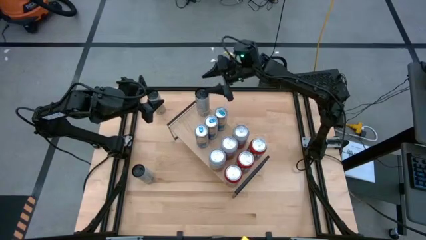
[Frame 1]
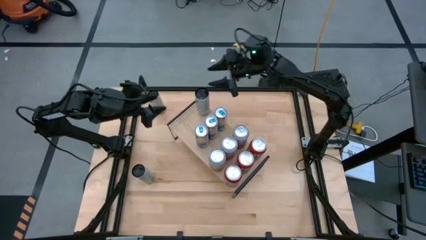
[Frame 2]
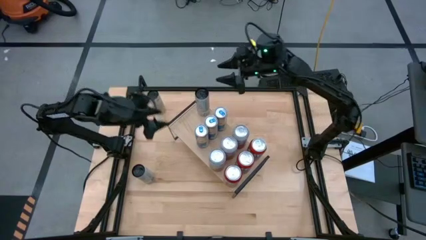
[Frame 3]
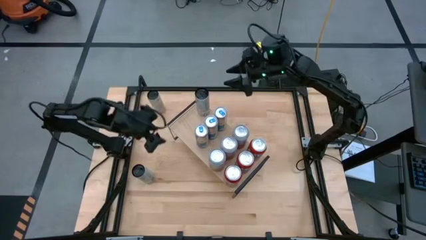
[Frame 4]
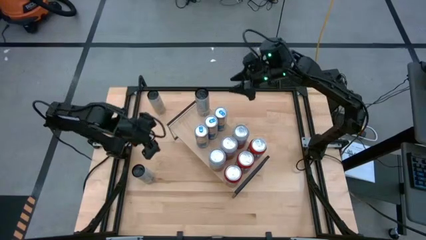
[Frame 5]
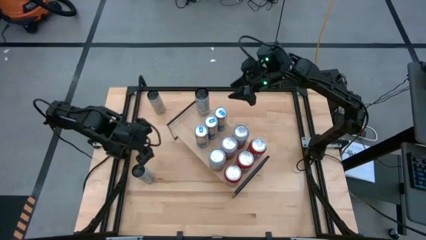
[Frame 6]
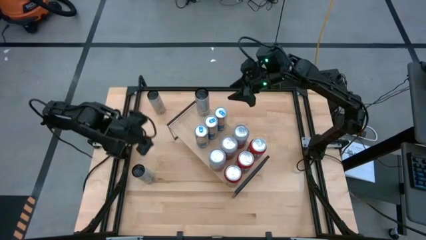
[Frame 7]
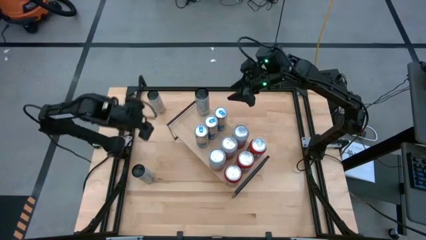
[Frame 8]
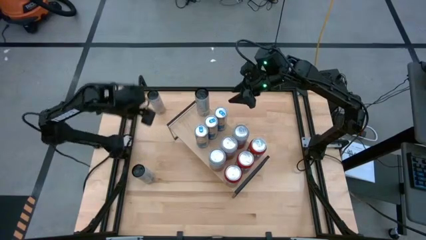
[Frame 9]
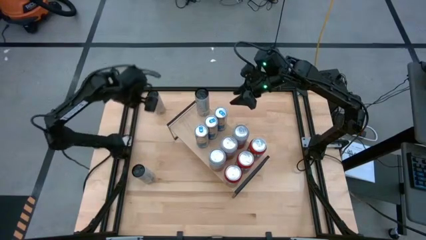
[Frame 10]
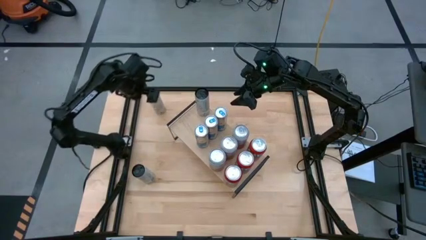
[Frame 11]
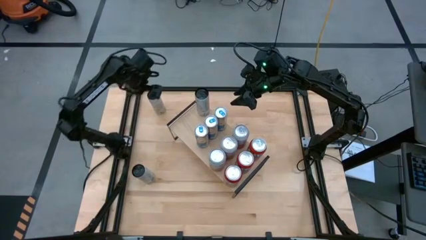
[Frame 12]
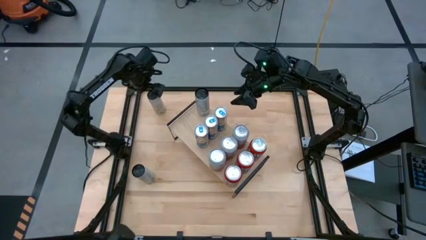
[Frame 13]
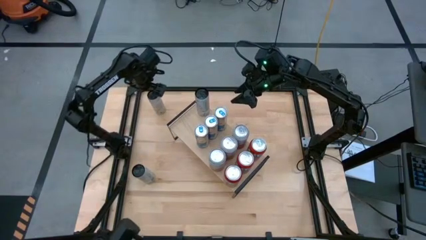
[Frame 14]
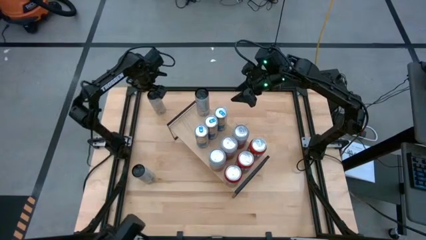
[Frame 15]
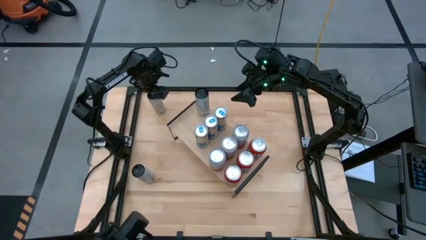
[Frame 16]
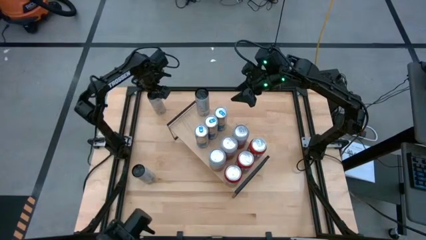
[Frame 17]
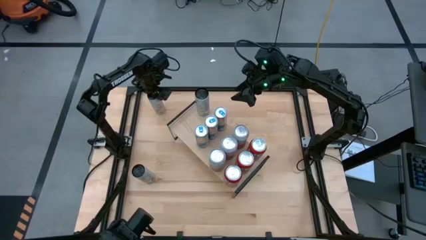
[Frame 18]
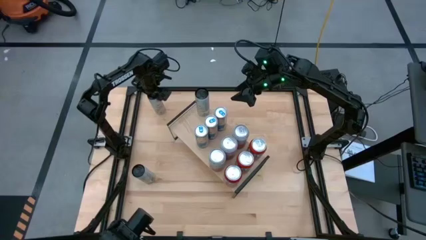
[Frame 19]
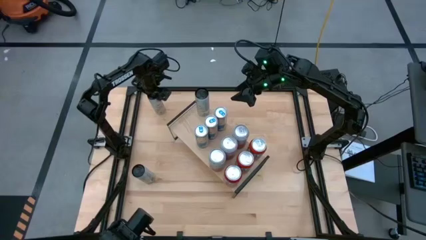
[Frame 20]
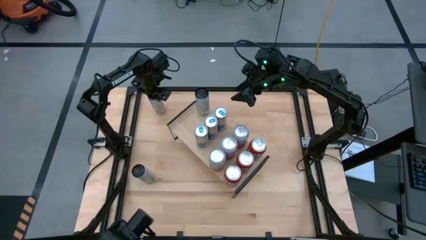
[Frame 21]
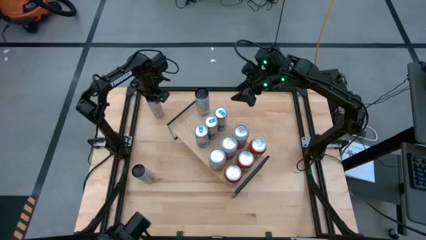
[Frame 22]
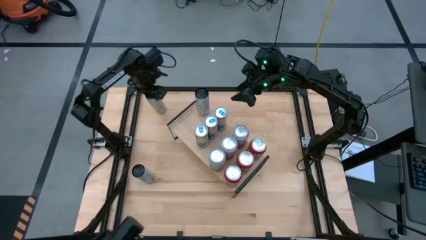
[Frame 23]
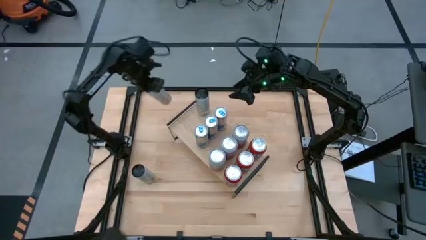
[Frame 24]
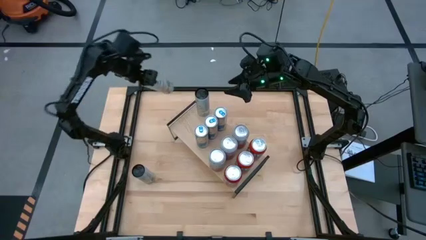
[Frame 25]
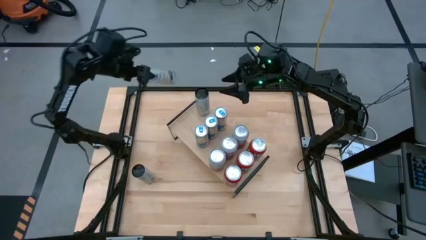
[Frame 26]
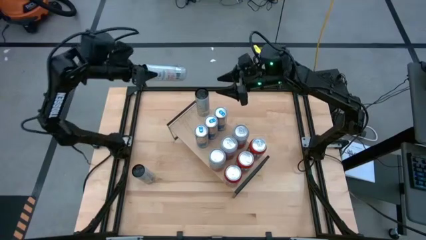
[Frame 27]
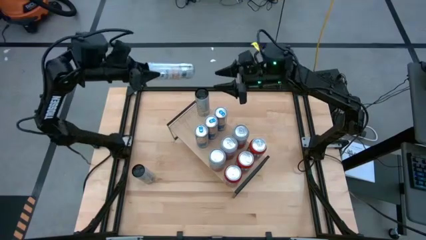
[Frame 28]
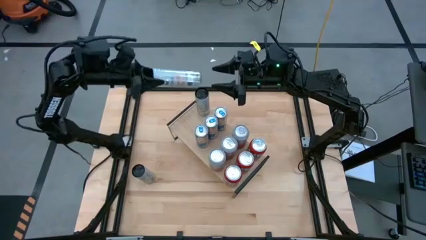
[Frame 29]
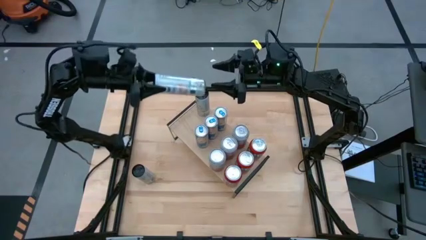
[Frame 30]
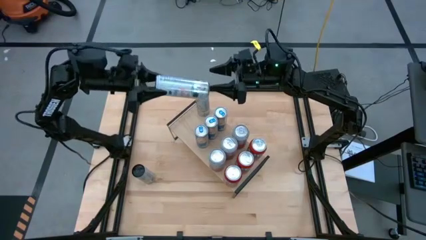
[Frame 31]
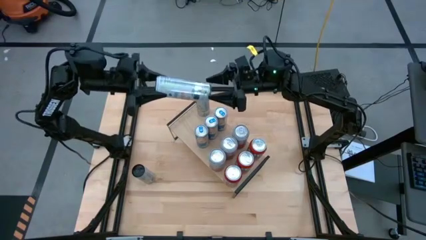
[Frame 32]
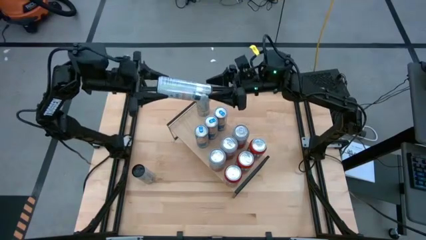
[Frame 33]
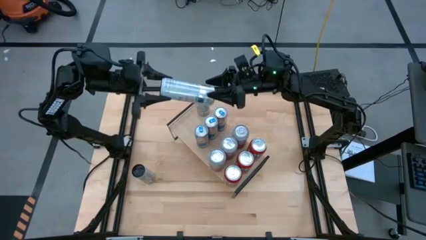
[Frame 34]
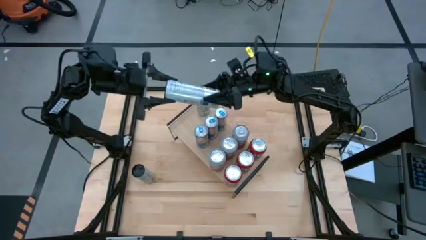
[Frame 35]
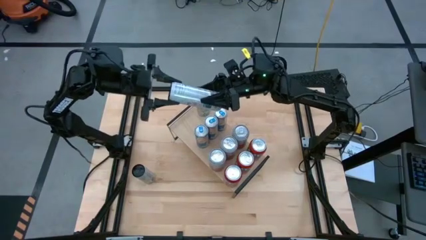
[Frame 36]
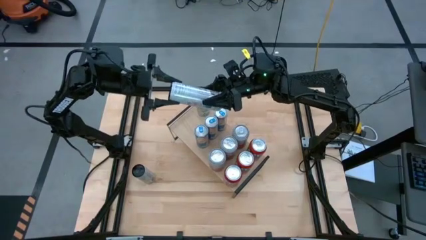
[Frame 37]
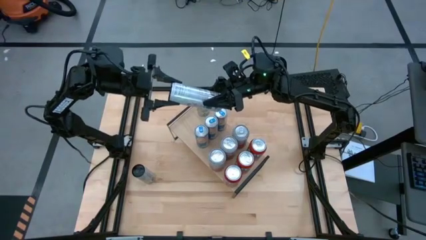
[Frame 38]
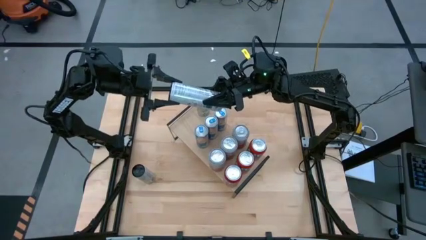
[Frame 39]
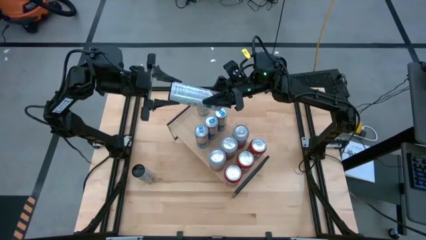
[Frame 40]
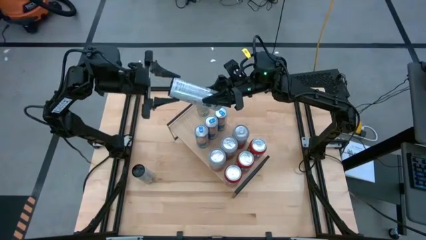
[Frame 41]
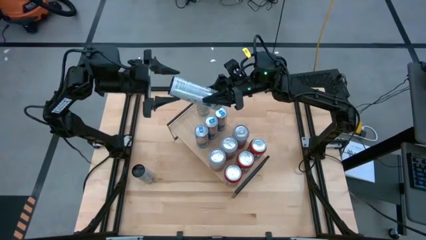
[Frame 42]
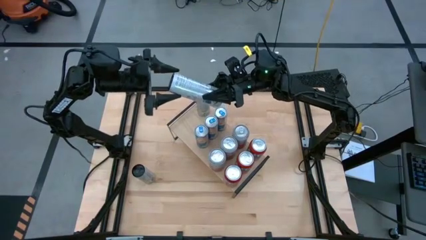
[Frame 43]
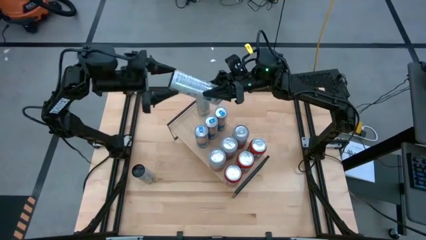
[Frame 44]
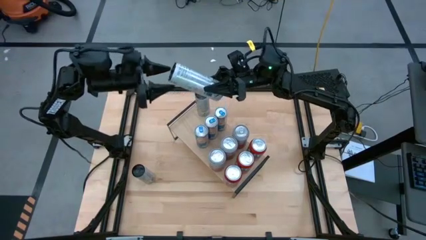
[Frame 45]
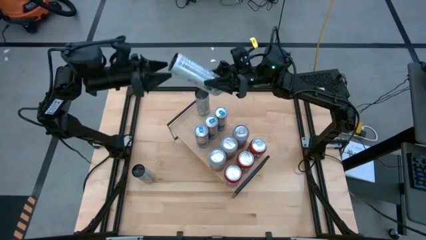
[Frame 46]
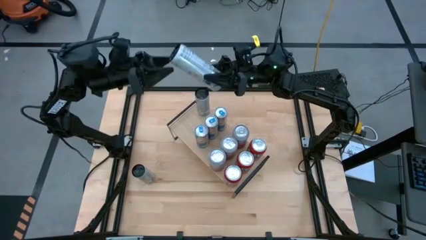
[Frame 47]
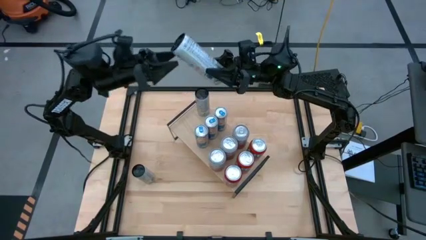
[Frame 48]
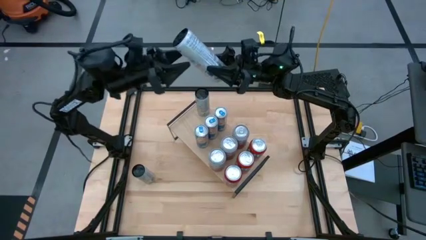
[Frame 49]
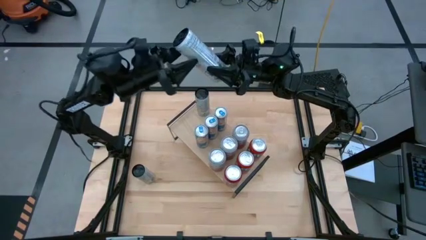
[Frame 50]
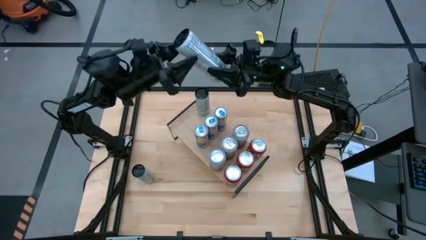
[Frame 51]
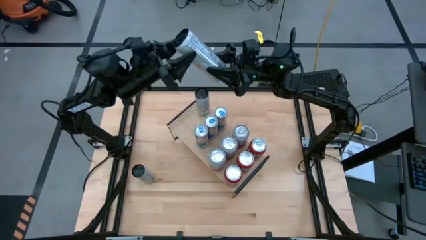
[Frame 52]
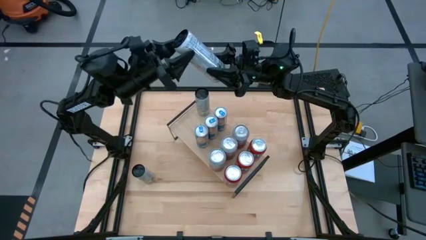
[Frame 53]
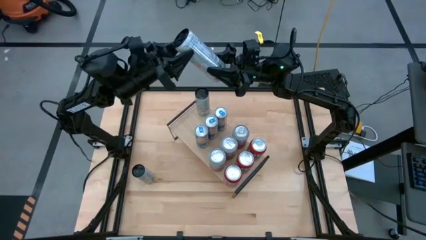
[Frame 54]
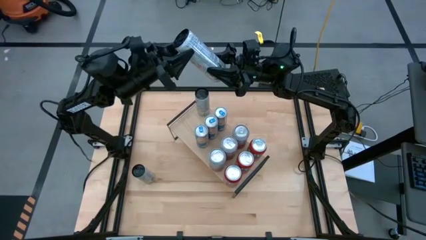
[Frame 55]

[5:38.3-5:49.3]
Task: Place canned beverage on shelf
Put the top white yellow soda can on the shelf aligned with the other white yellow soda can

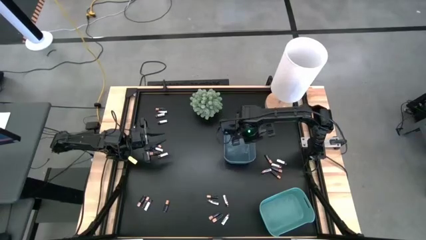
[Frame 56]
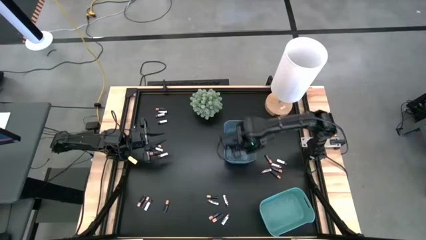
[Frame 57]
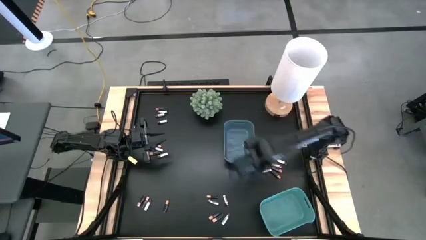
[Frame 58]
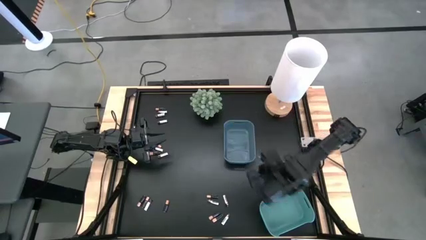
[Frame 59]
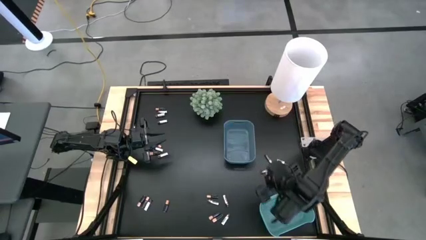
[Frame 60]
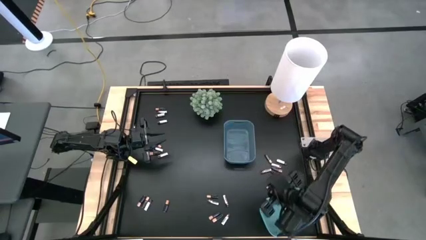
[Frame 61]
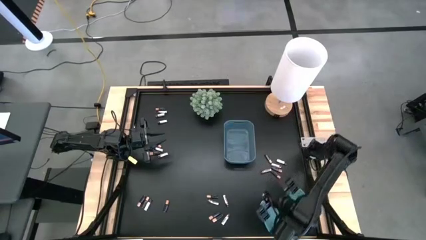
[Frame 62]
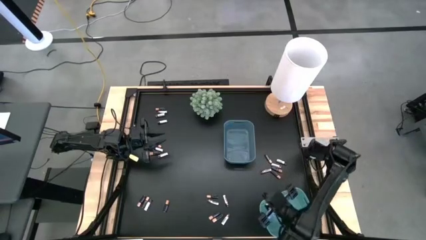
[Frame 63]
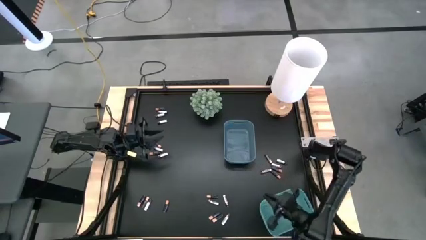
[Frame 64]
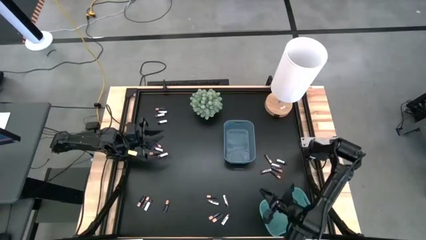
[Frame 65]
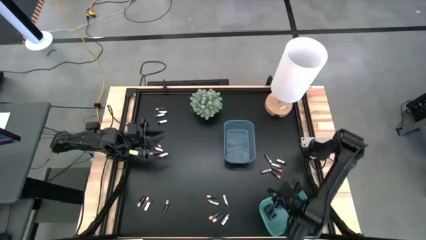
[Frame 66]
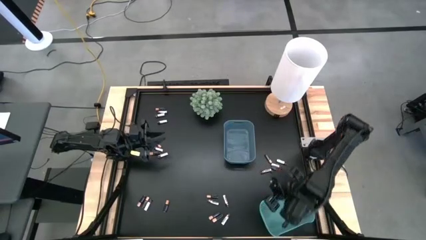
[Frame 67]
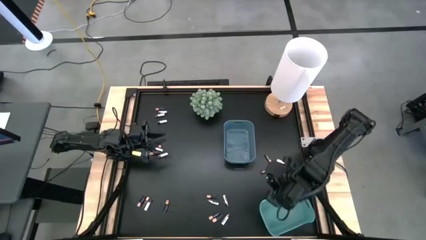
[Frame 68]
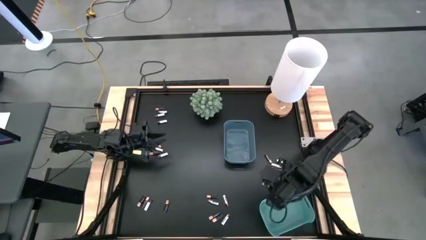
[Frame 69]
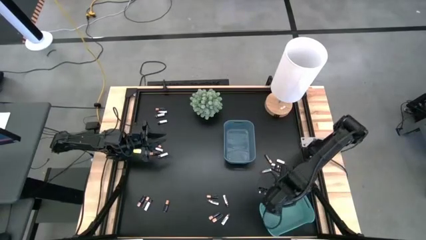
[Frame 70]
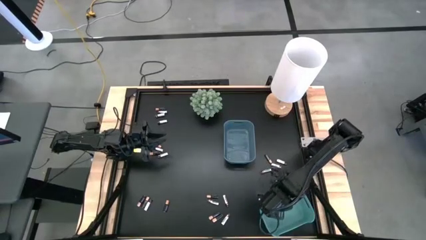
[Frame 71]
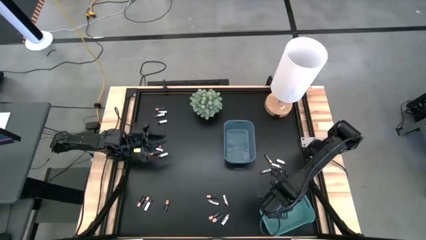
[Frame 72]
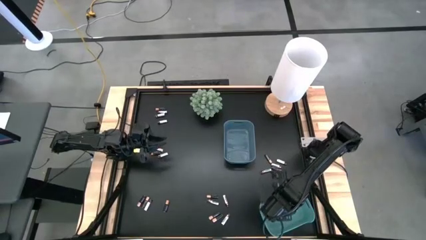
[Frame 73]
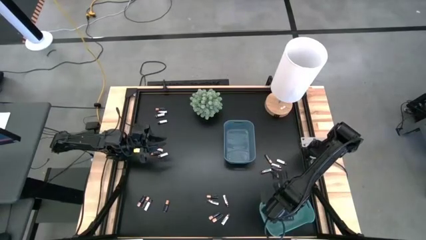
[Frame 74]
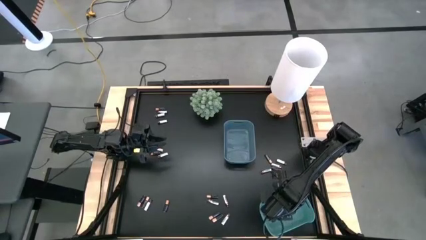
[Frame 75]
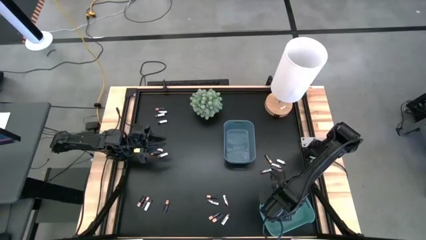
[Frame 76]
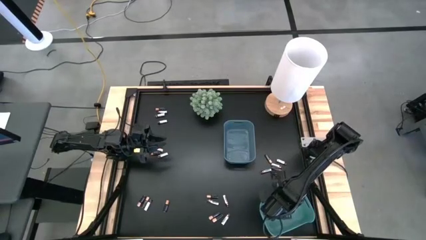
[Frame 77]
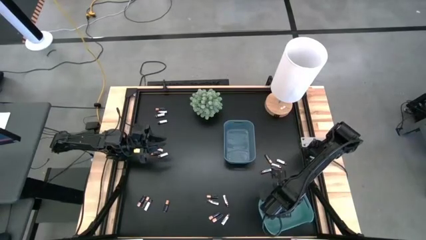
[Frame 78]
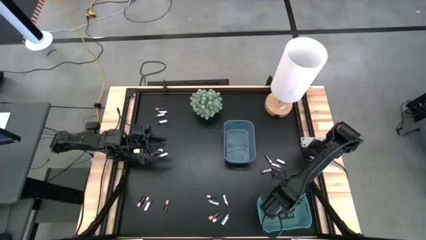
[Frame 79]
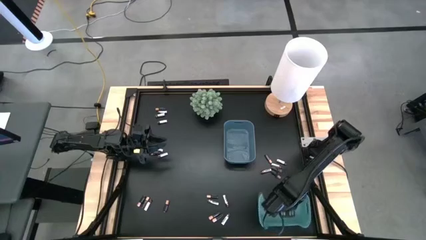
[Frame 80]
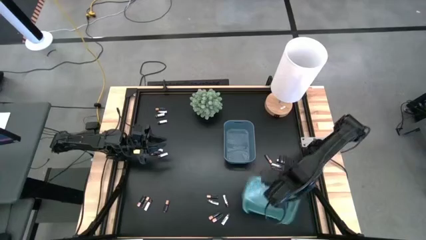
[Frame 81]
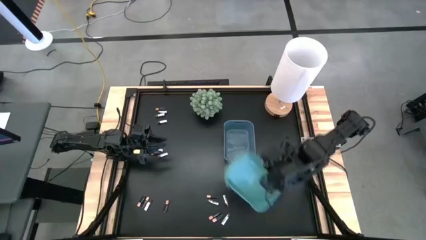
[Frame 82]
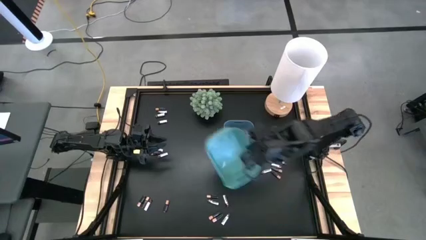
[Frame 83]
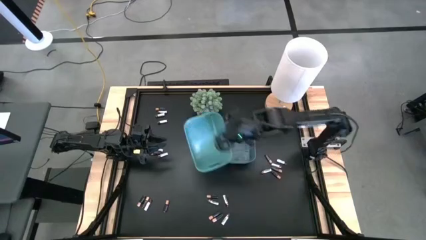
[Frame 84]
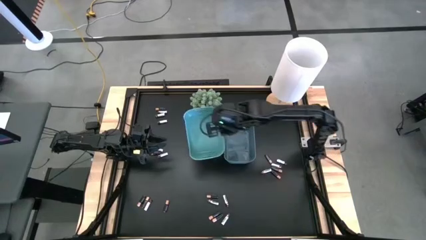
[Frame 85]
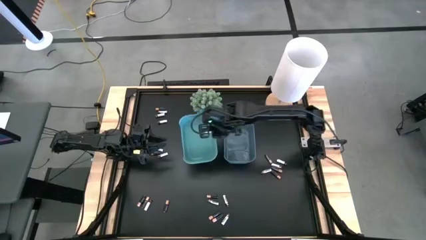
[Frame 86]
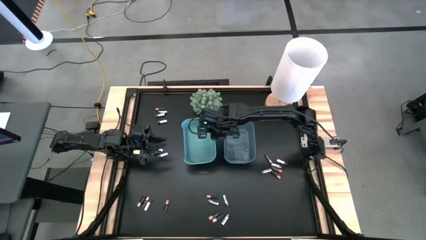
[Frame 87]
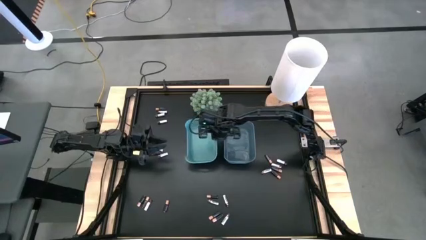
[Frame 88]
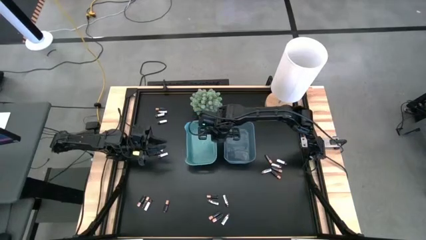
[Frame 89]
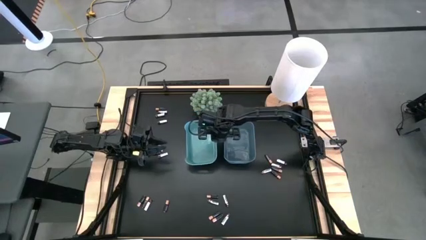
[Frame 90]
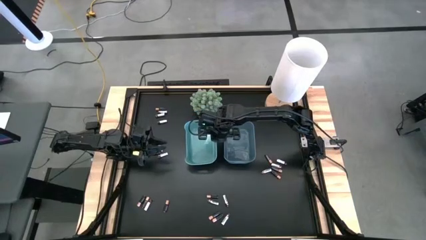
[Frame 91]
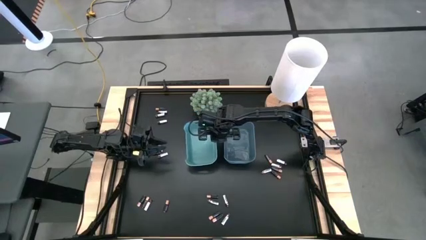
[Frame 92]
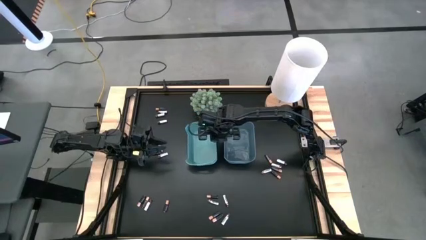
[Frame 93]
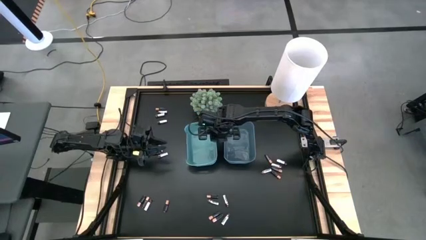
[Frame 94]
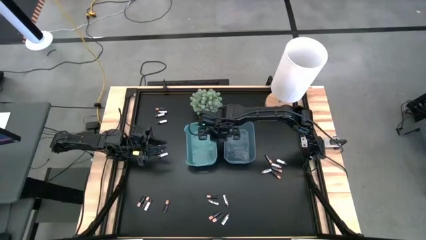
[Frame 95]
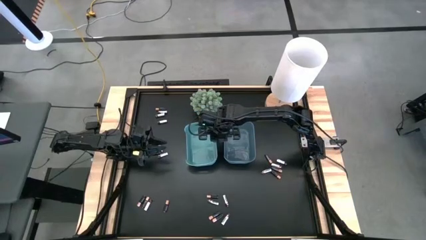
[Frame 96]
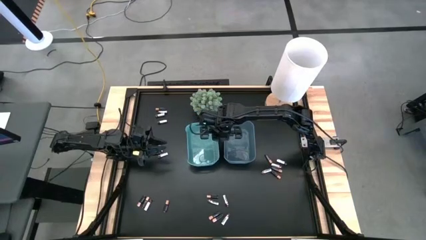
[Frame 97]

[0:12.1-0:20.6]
Task: Sort batteries
Move the green bin to the center of the table
